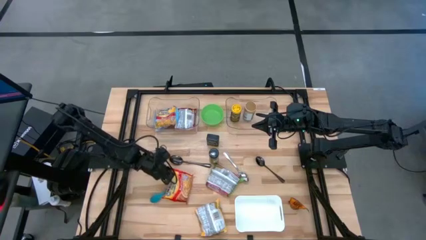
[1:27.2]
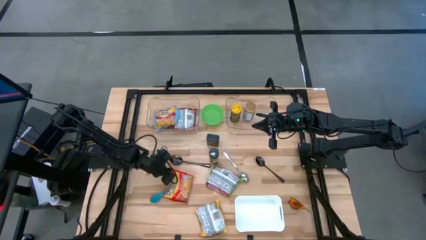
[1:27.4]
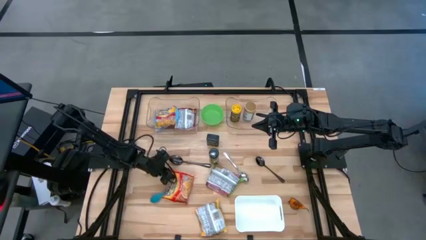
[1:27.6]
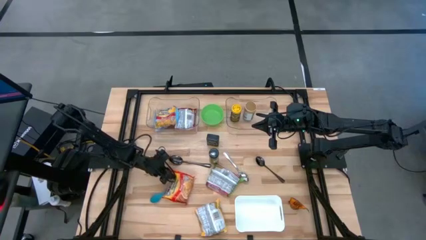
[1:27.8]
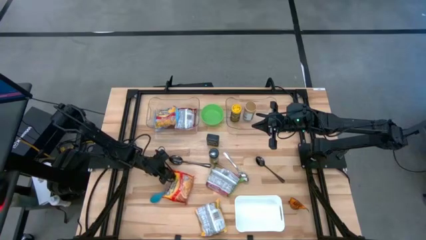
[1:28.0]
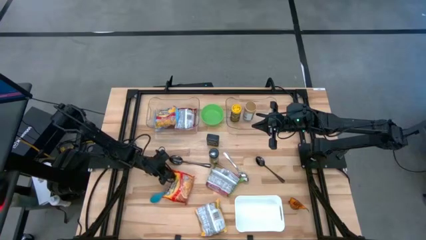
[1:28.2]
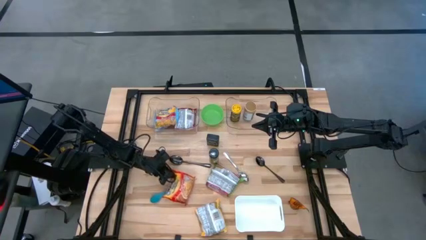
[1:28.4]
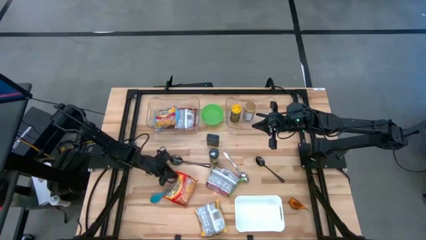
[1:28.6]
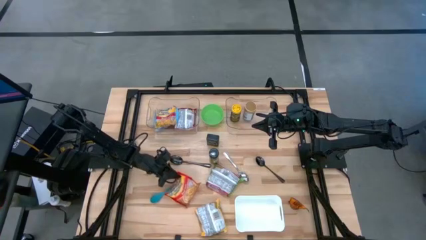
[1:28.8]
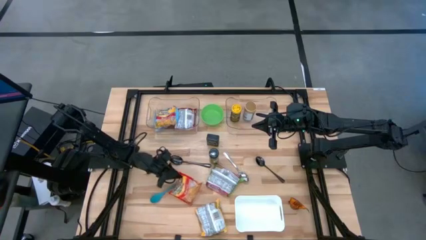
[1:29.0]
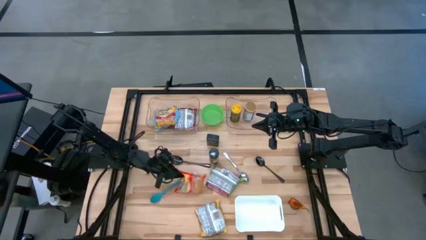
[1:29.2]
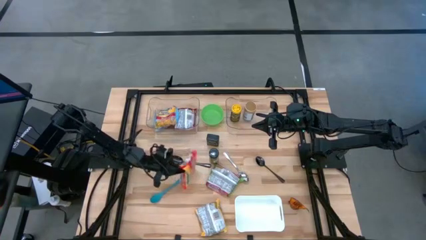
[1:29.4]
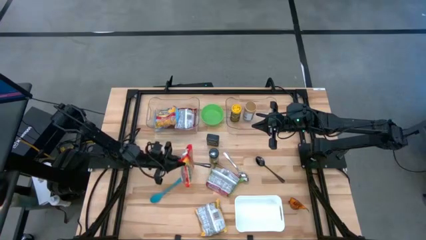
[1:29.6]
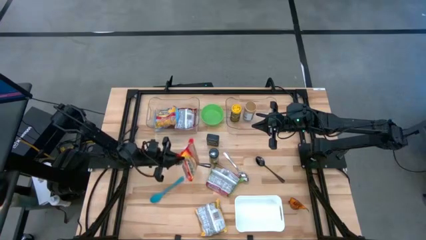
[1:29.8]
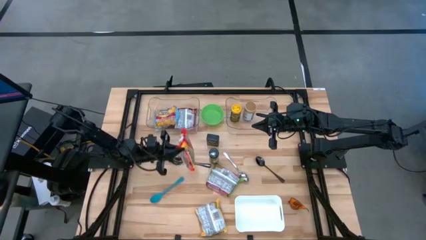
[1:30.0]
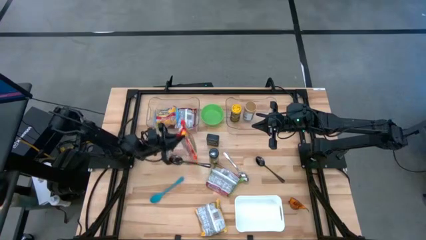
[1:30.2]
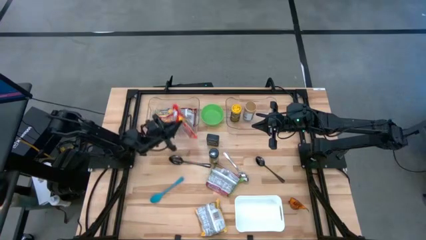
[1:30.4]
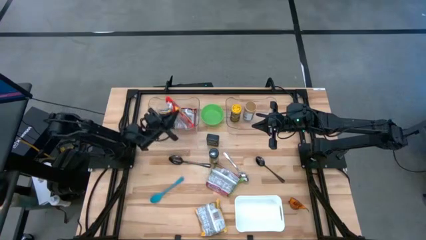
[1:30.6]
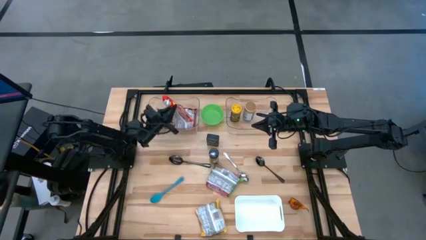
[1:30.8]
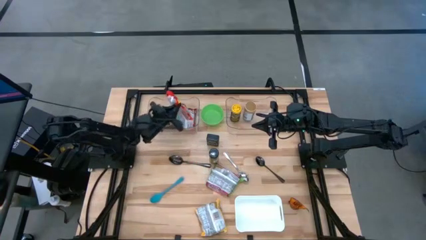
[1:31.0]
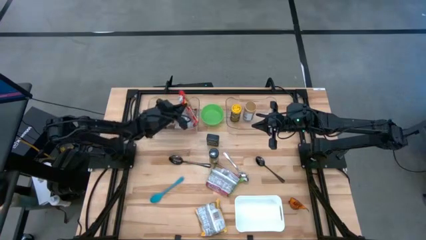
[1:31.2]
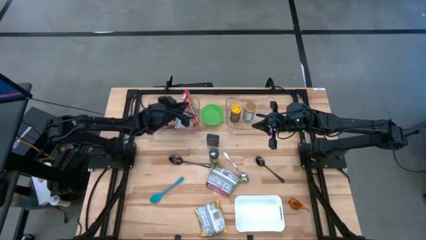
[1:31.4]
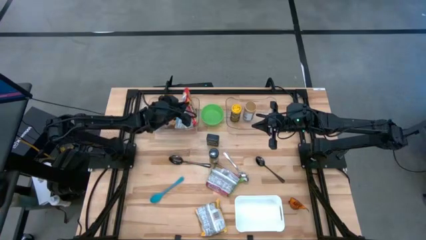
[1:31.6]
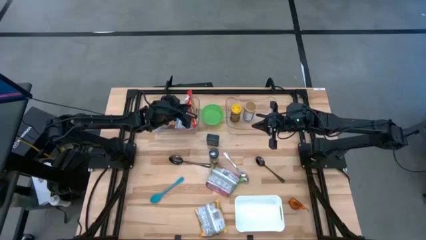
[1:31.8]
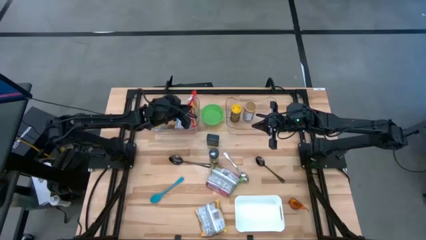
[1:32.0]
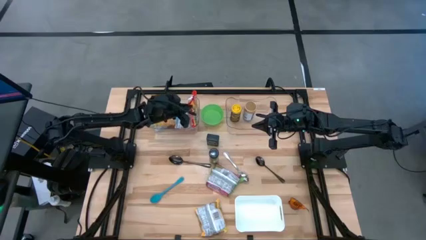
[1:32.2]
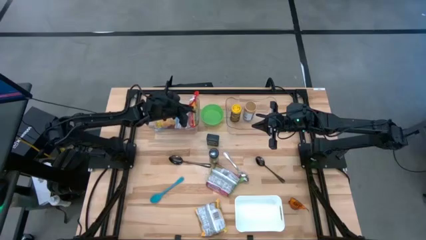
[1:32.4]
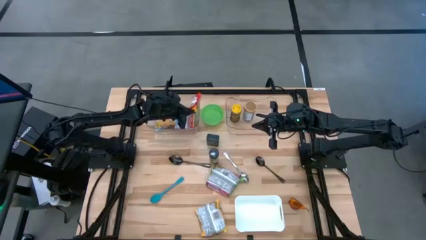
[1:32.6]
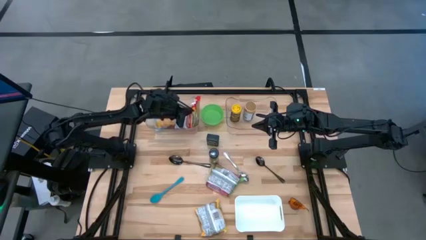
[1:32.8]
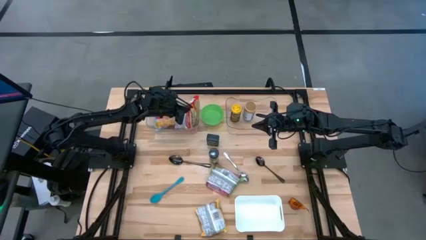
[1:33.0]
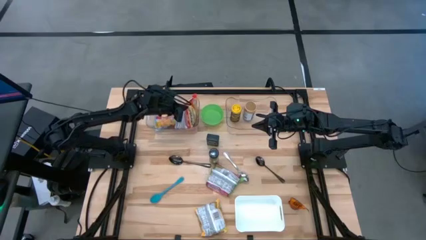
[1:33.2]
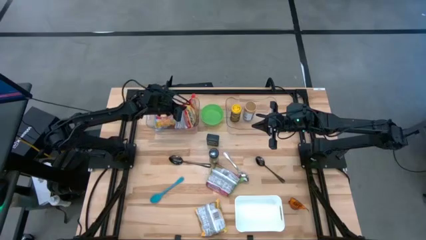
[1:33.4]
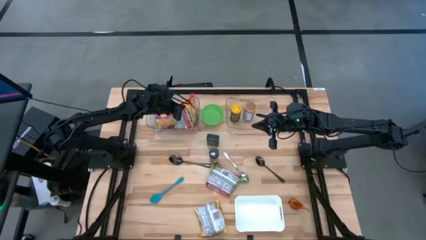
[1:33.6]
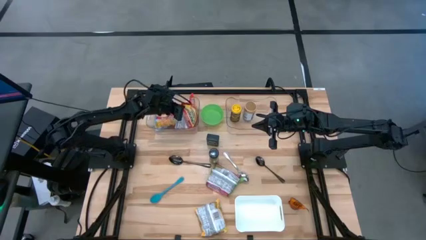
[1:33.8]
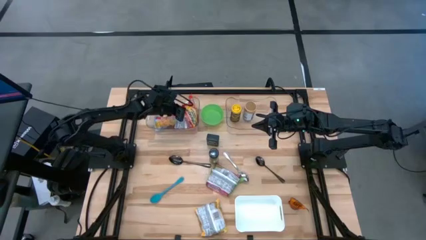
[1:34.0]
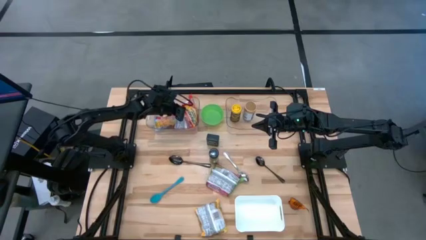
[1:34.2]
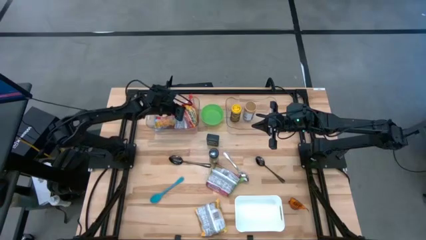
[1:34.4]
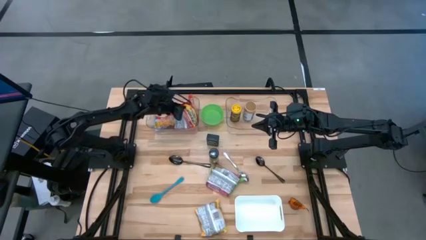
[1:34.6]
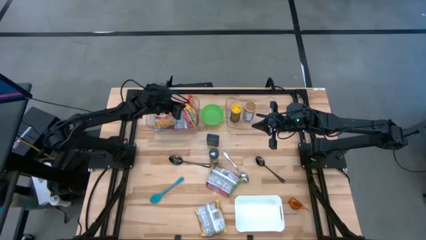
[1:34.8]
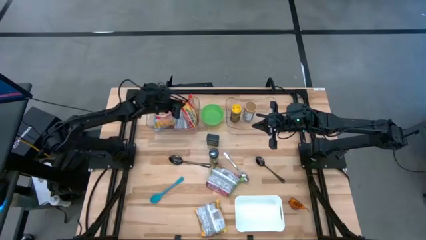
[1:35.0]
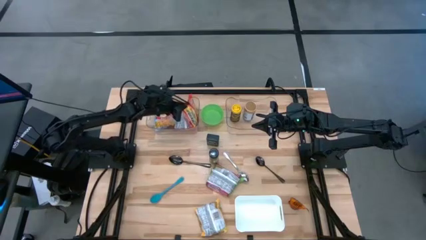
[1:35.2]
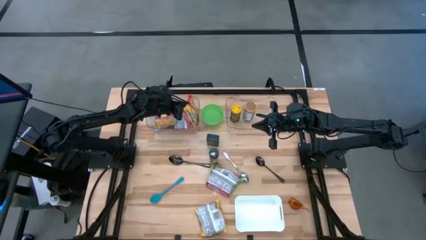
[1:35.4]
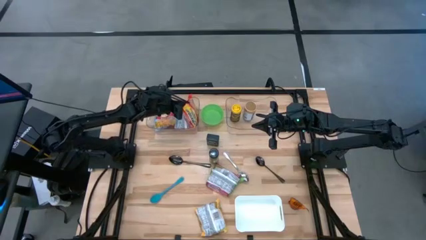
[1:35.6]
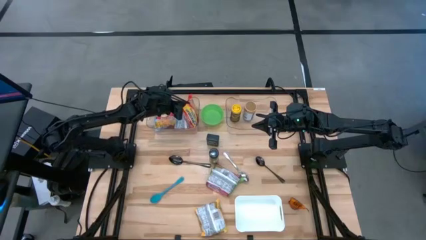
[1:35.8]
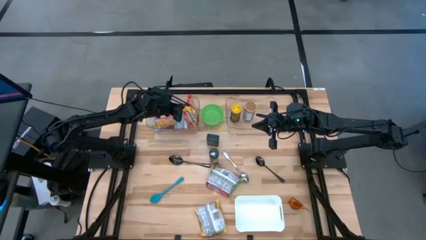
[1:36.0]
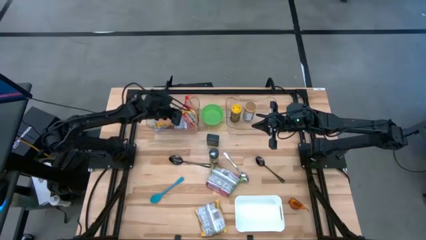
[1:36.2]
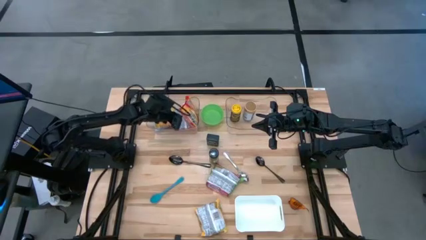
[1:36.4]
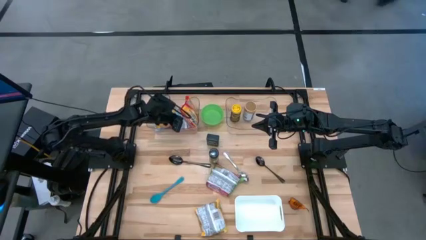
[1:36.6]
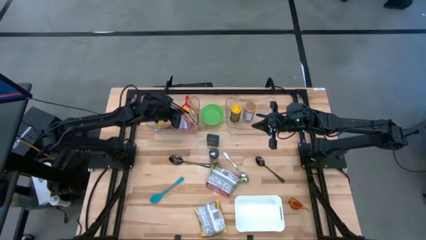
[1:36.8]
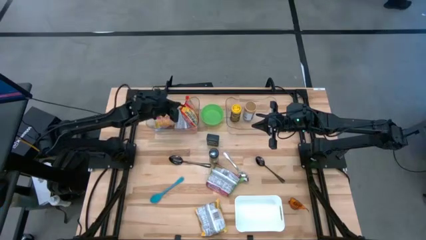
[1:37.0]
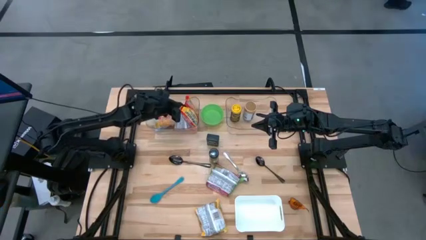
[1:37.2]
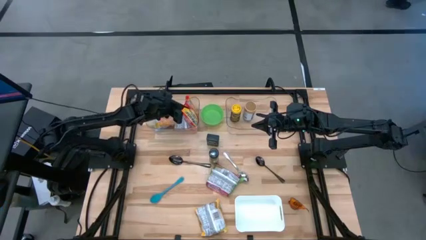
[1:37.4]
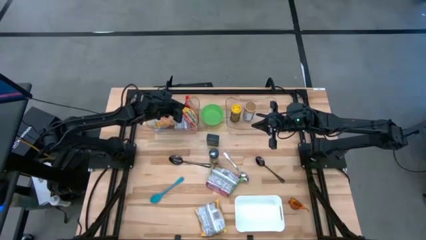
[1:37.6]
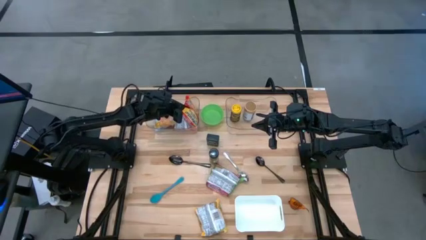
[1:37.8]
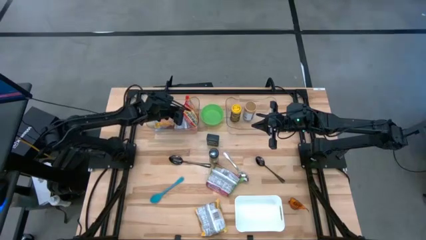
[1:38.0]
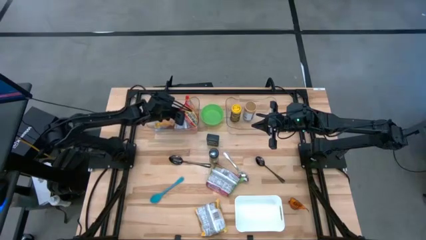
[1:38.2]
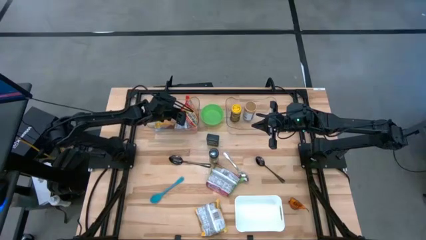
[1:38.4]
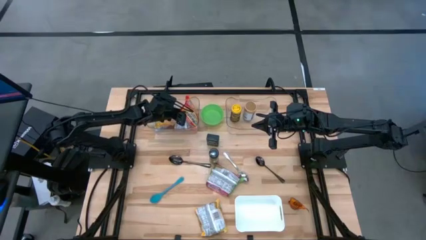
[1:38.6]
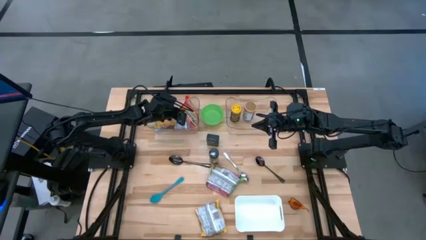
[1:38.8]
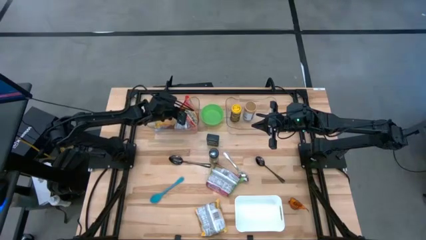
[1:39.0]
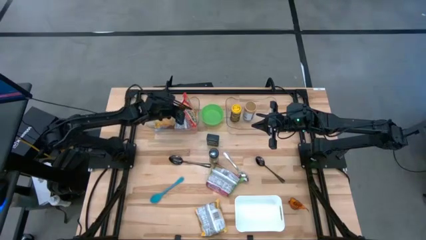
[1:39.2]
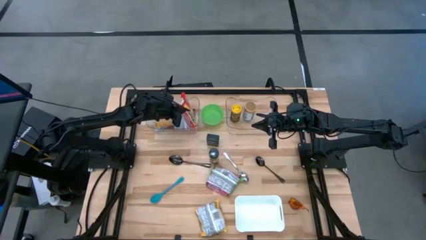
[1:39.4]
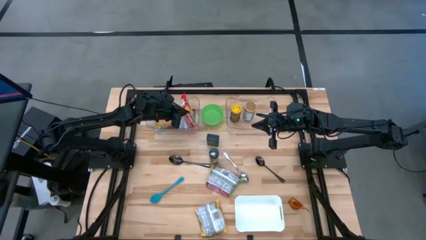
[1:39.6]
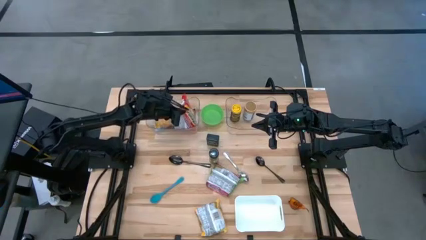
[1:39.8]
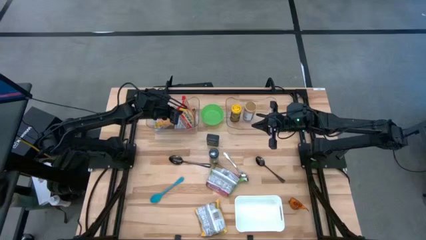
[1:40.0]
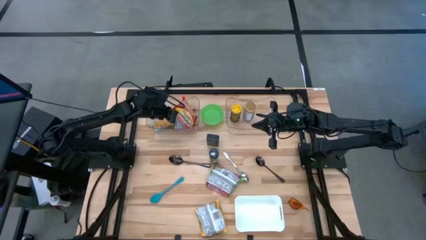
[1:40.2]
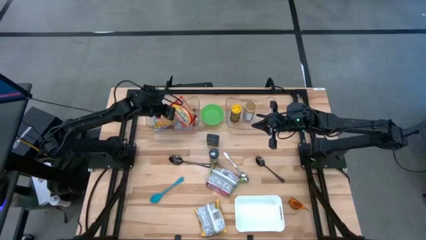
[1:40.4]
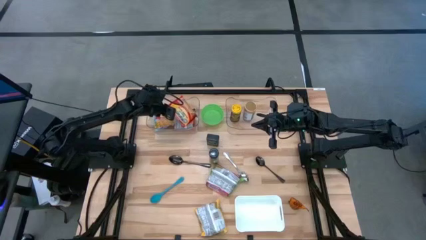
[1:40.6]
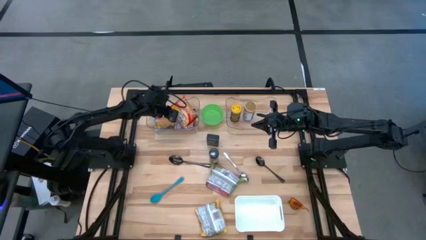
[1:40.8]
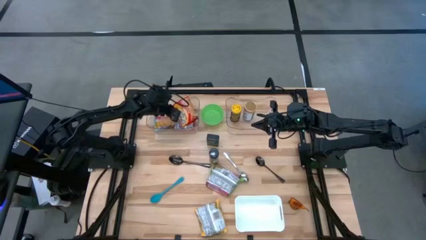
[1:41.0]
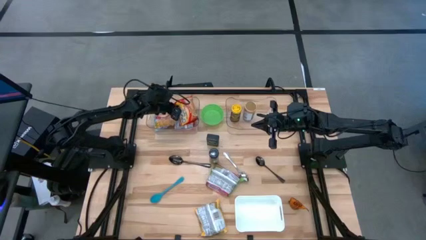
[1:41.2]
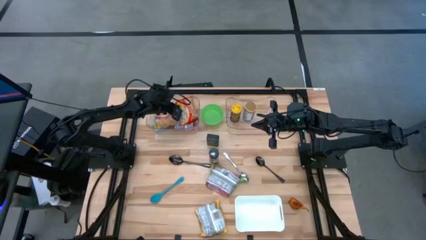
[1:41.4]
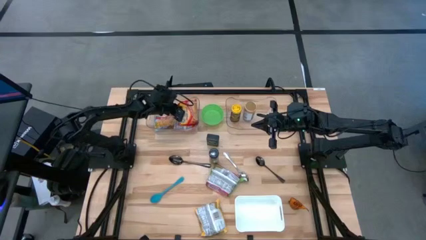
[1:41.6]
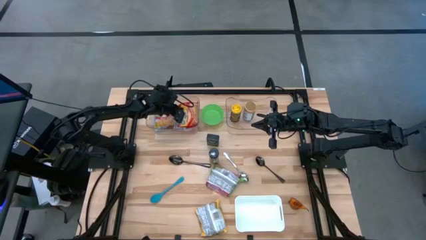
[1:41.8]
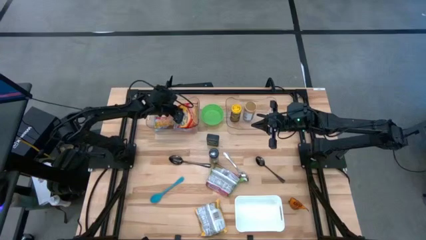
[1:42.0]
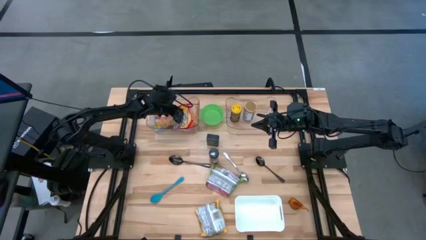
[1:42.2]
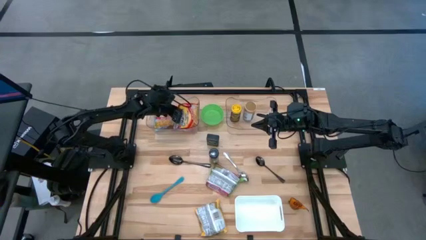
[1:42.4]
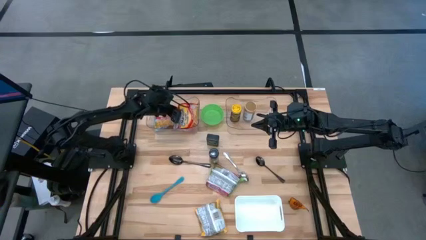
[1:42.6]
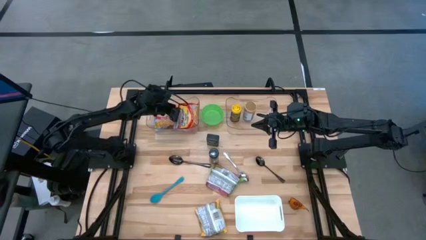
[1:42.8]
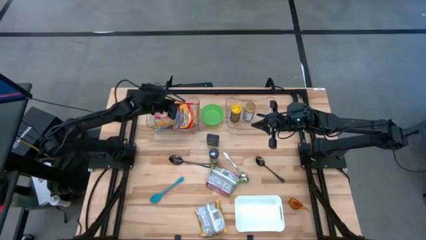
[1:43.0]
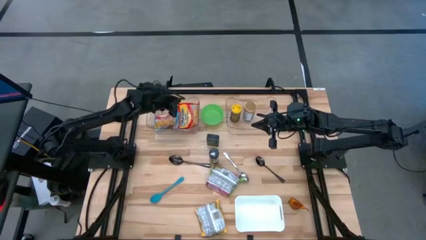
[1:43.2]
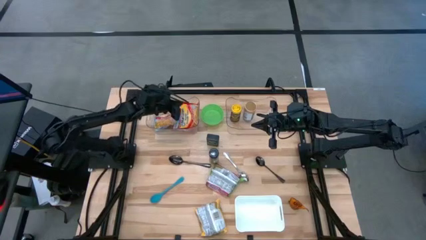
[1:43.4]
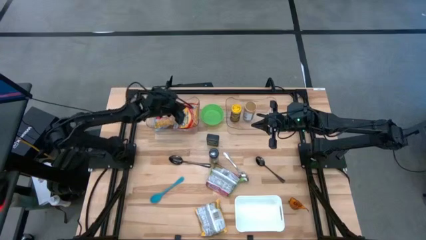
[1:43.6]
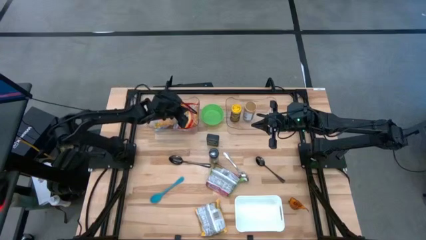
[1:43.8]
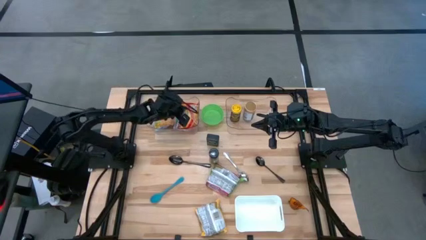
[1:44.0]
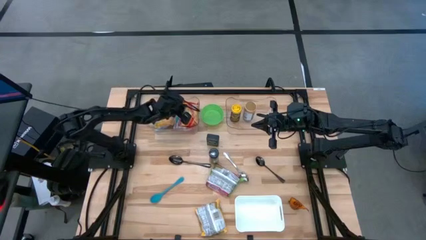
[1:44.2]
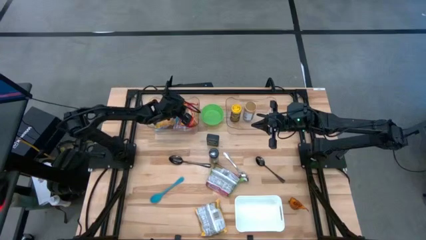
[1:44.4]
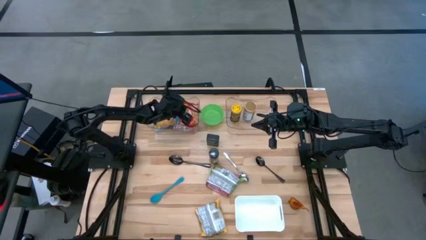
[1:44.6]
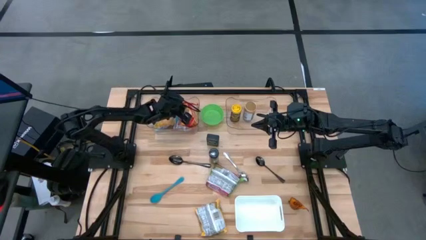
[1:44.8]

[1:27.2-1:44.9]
Task: Pick & Place Food Item
Put the orange noodle pack in the left transparent bin
